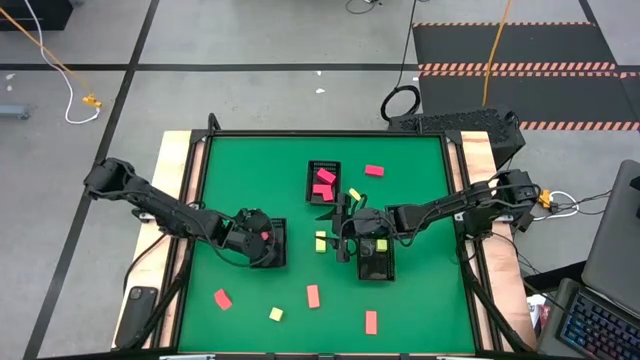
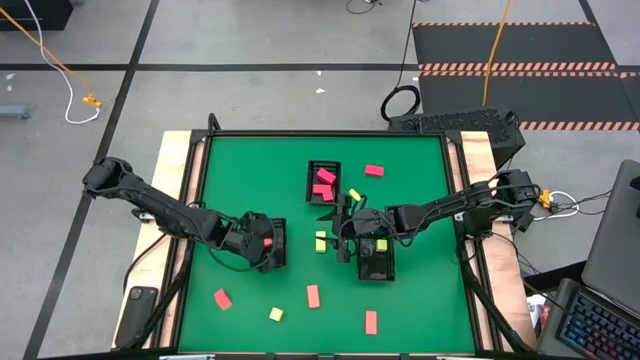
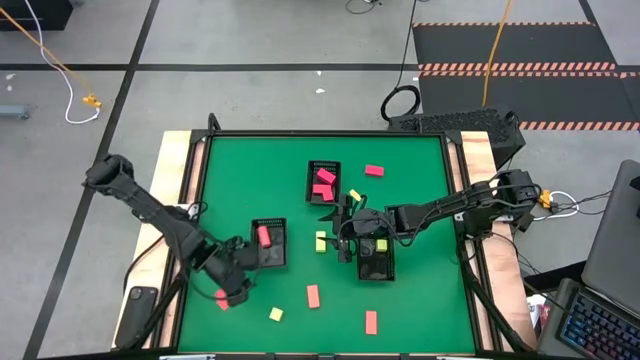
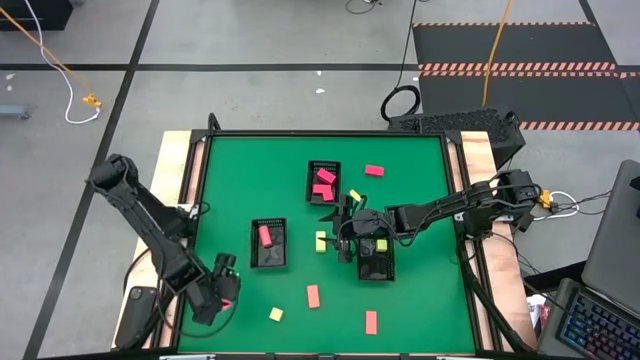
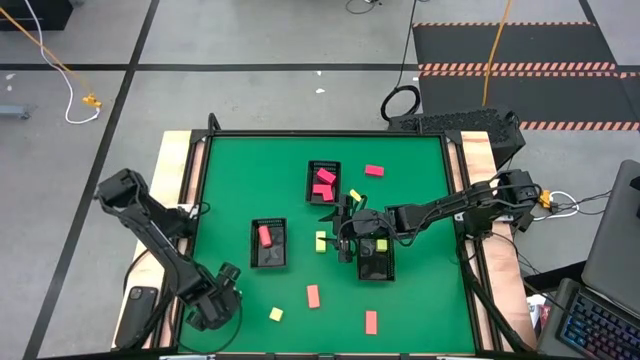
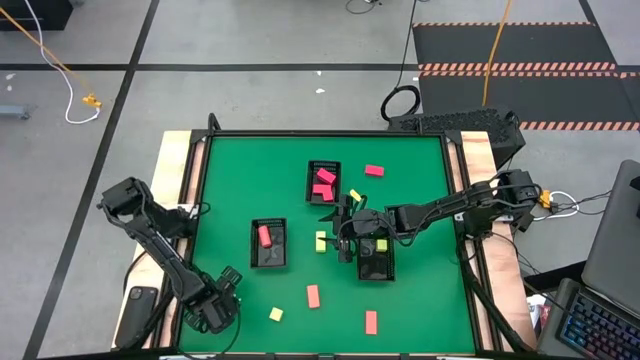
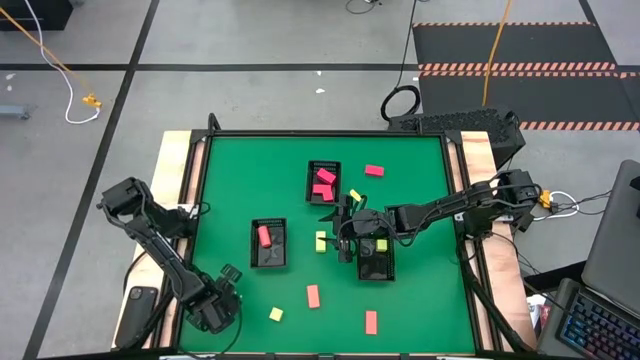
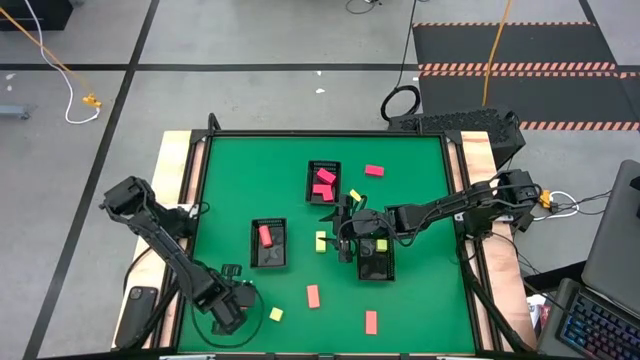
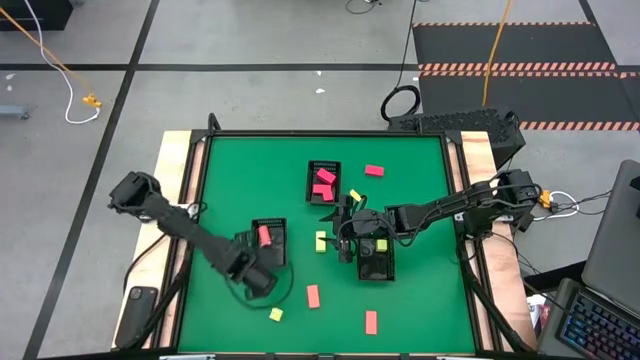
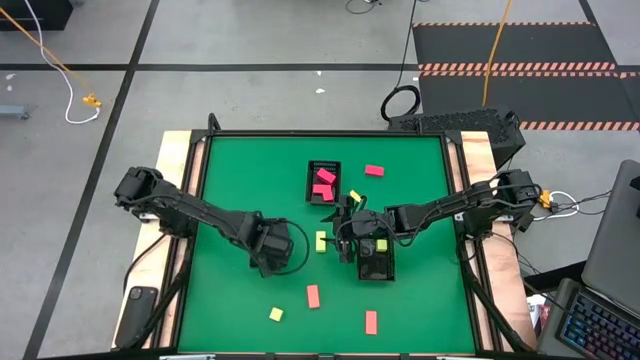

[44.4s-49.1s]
Task: Sort & place blocks by color
Put the orange block into the bottom left black bin

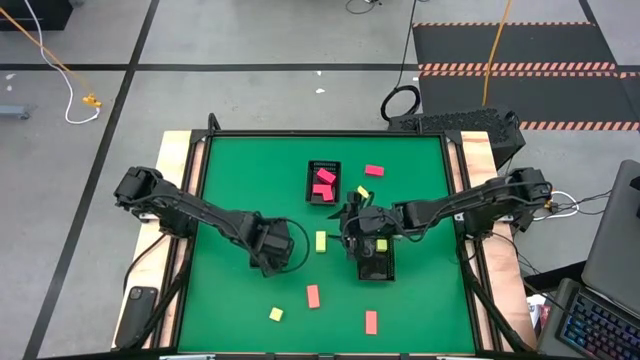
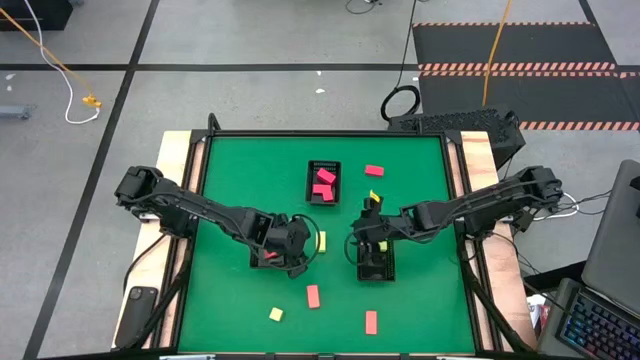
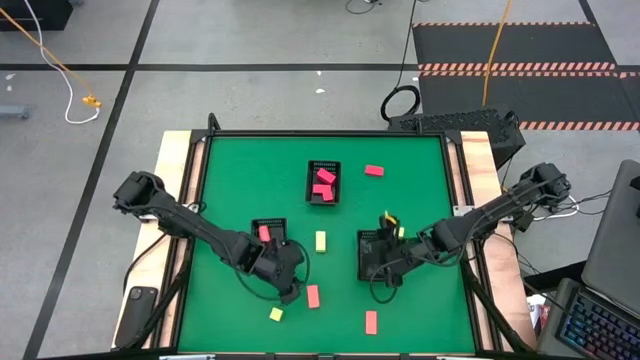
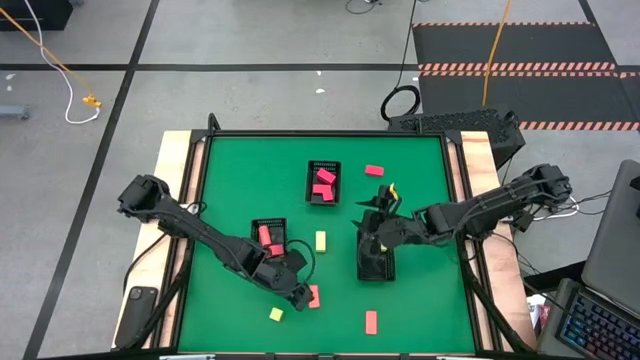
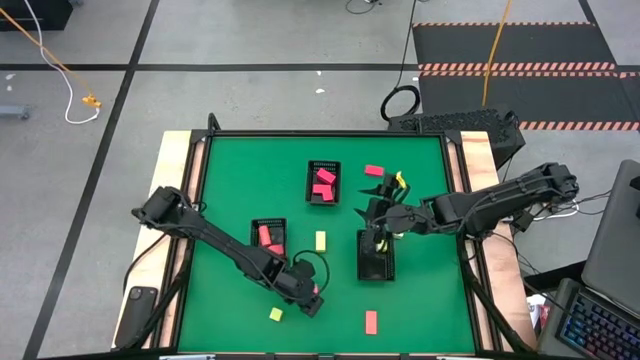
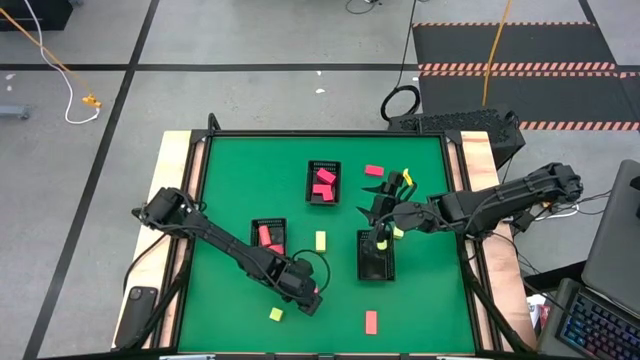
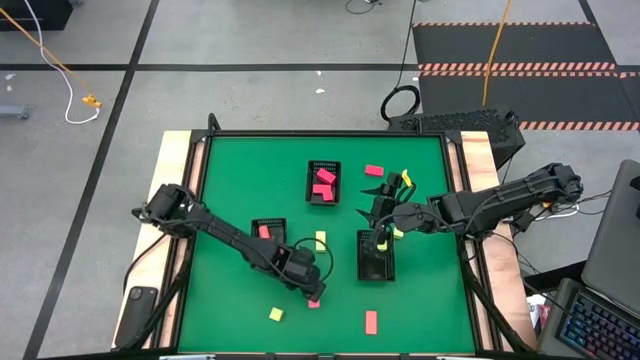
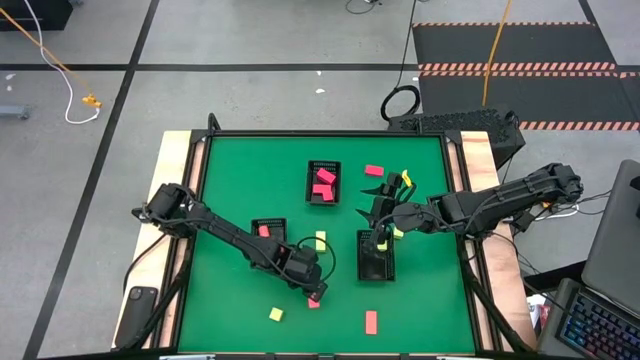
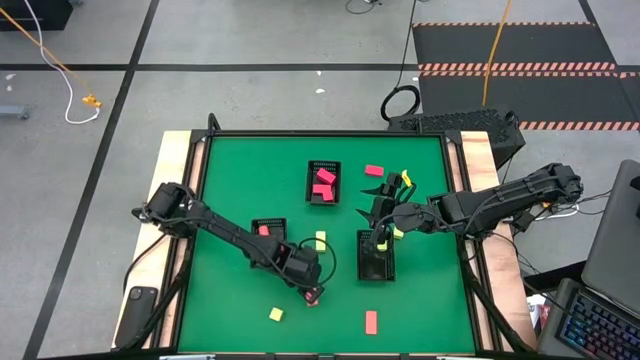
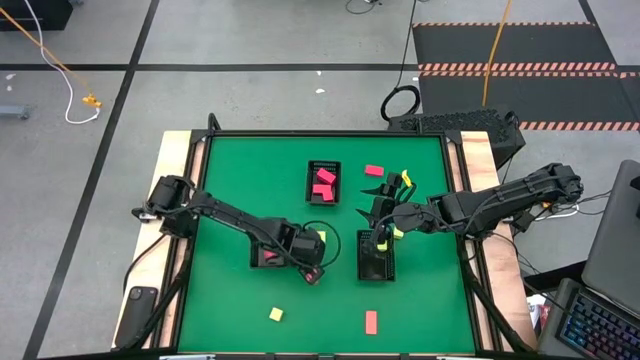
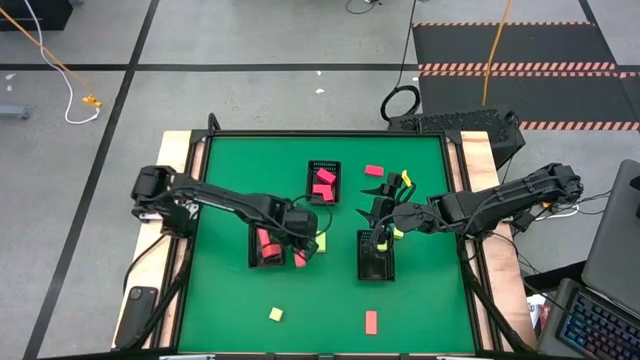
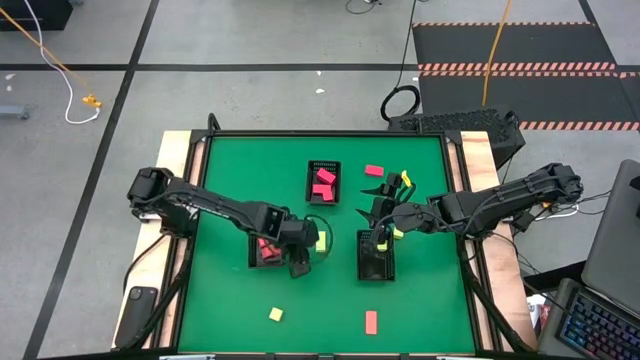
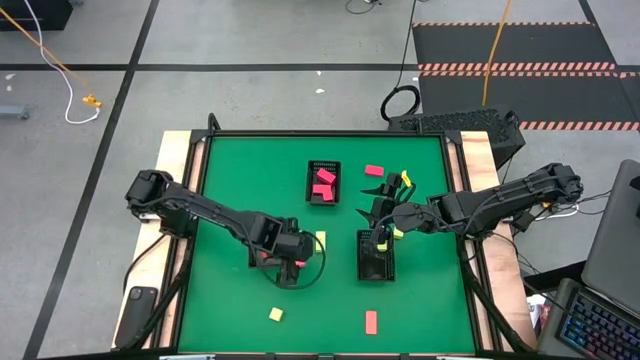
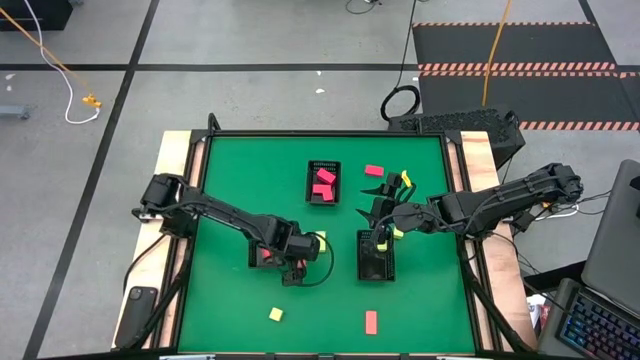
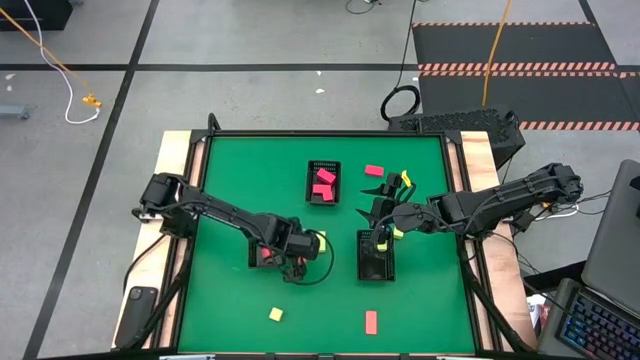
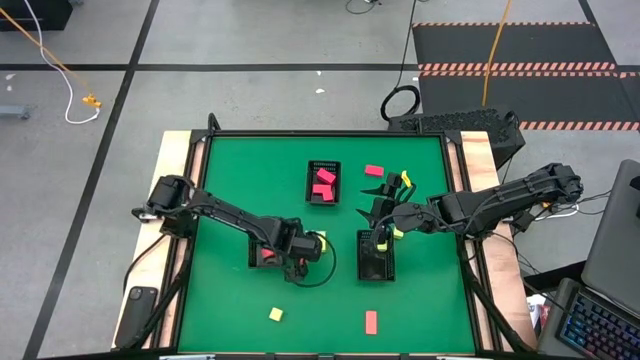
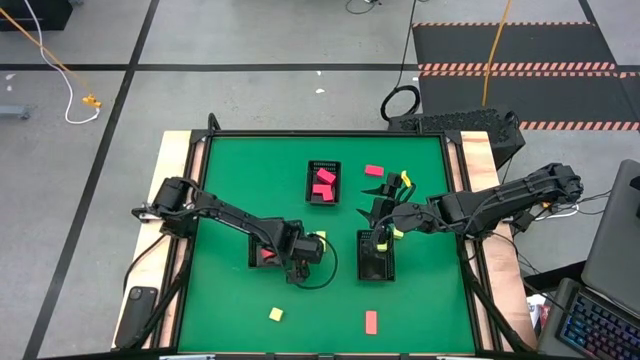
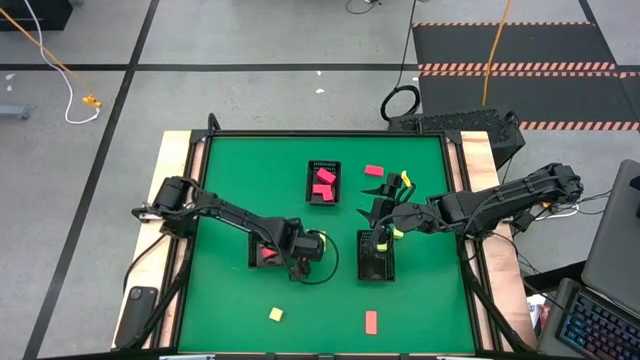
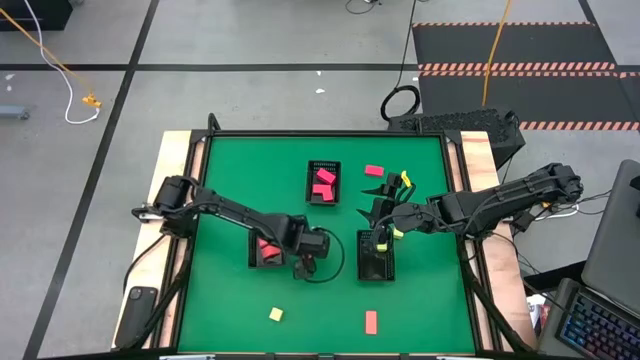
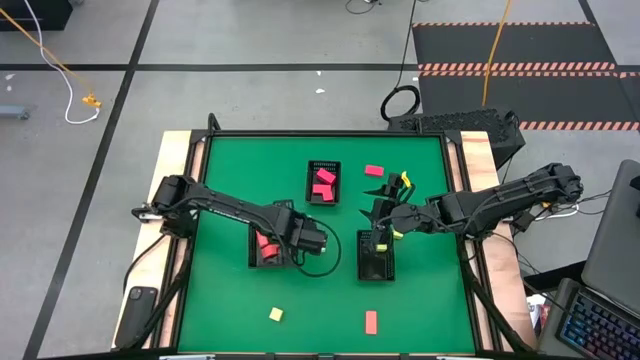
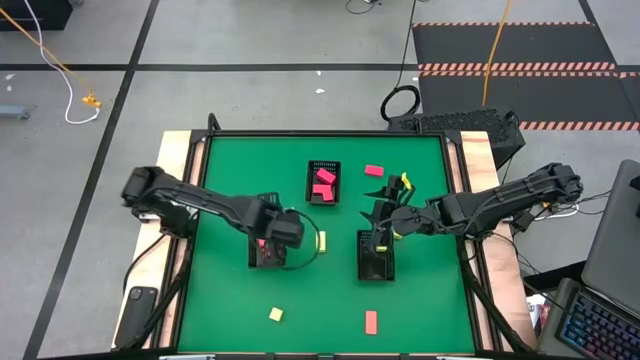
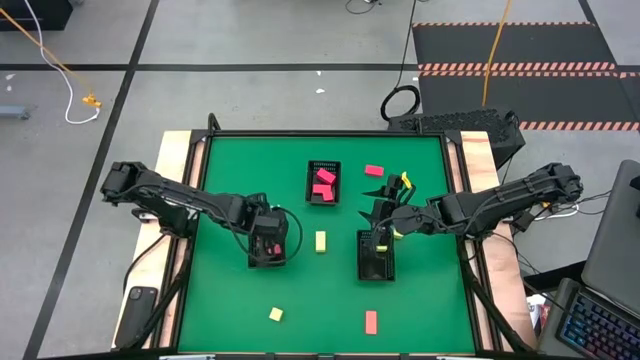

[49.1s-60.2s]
Put the orange block into the bottom left black bin

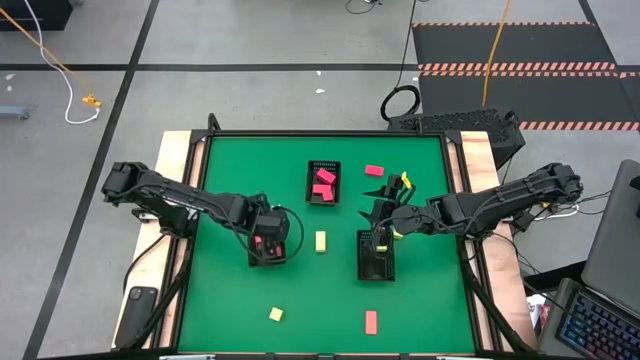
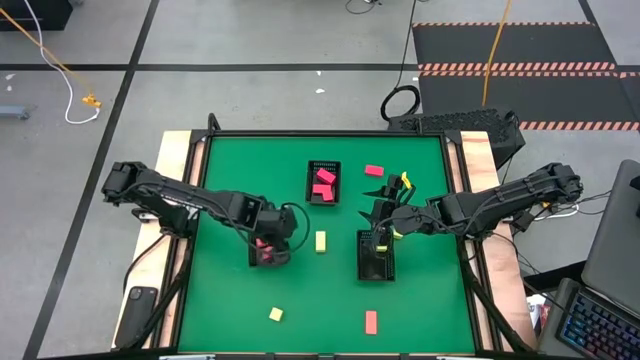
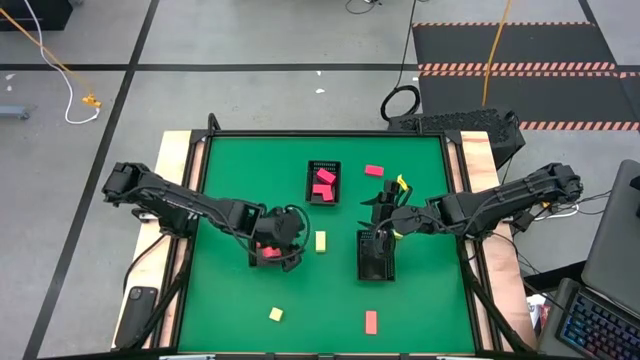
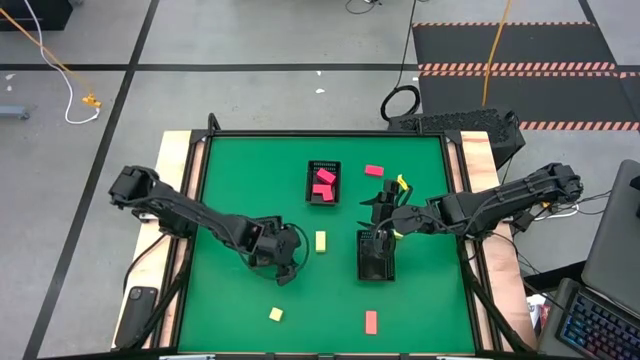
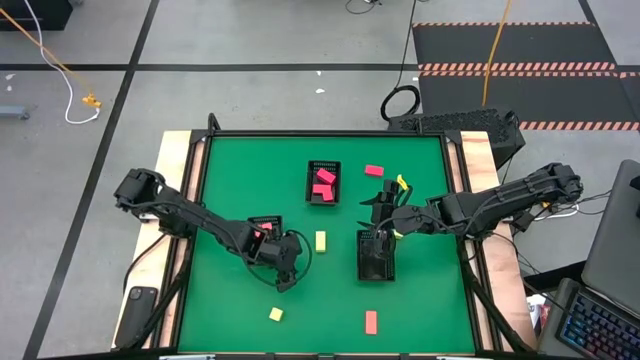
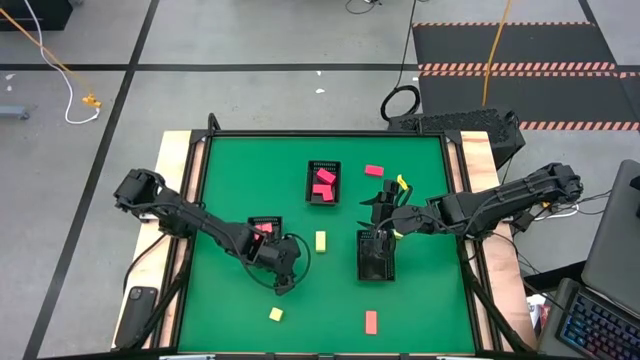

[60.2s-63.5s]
Adjust the bottom right black bin

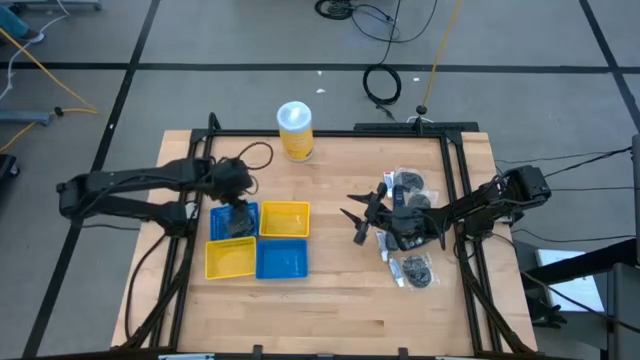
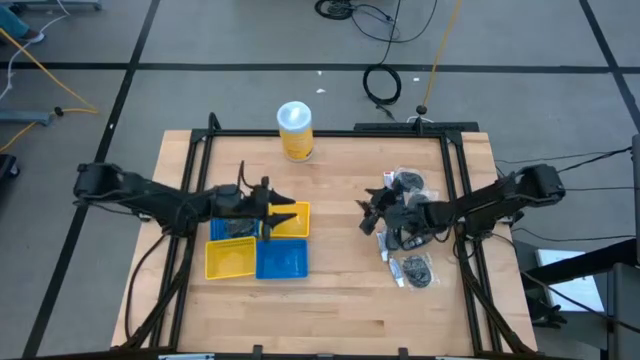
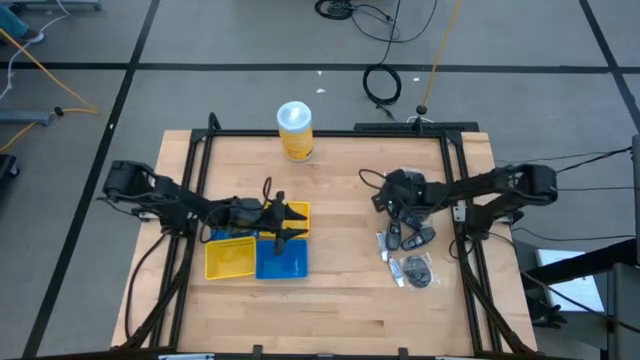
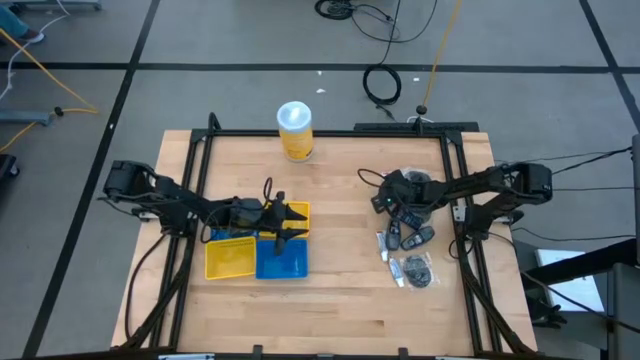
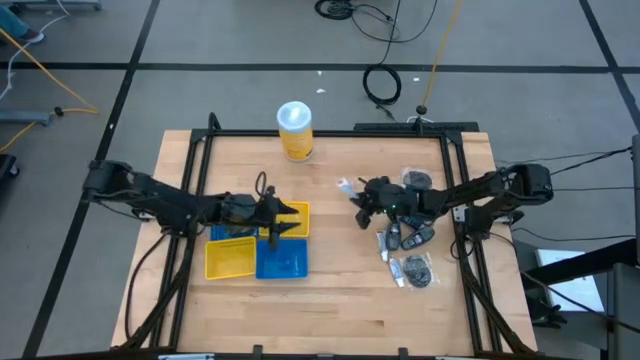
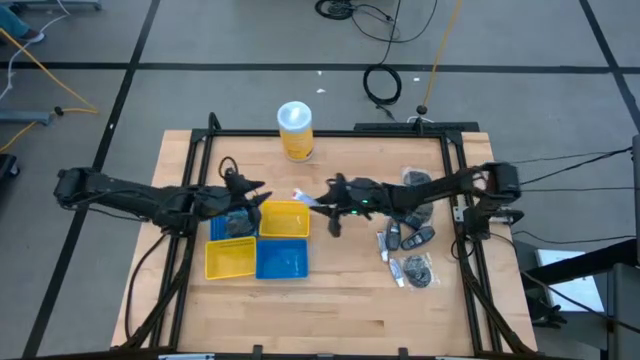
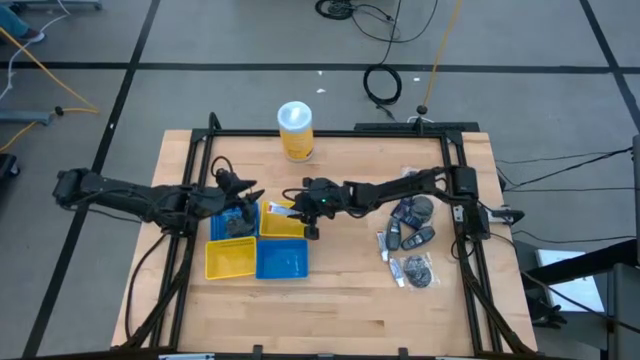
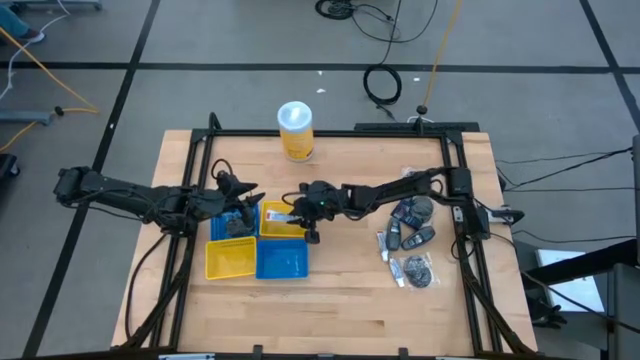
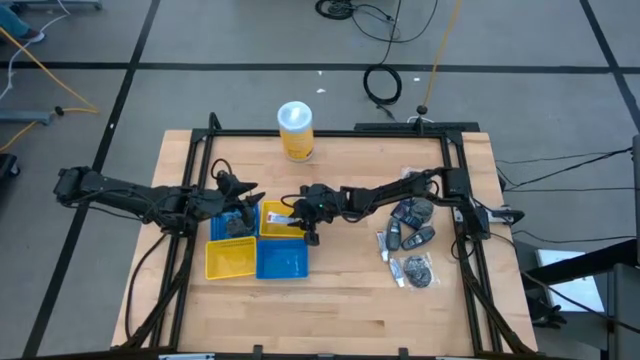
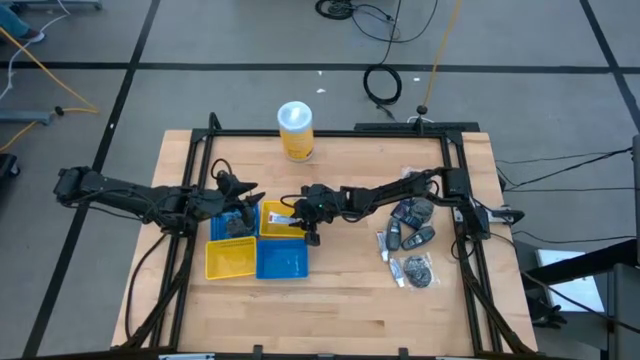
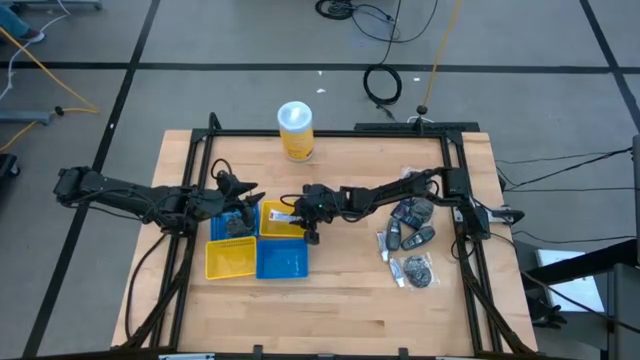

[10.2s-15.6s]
Task: Pick & Place Travel size toiletries
Put the white toothpaste into the top yellow bin
